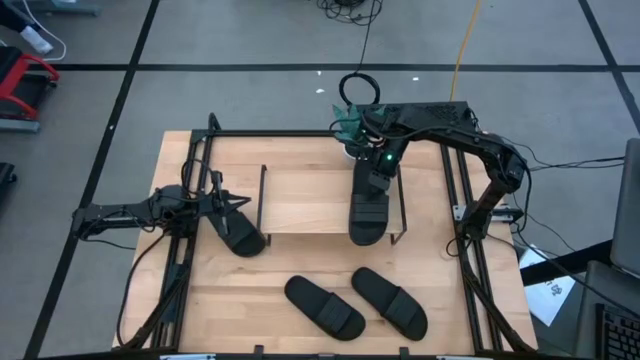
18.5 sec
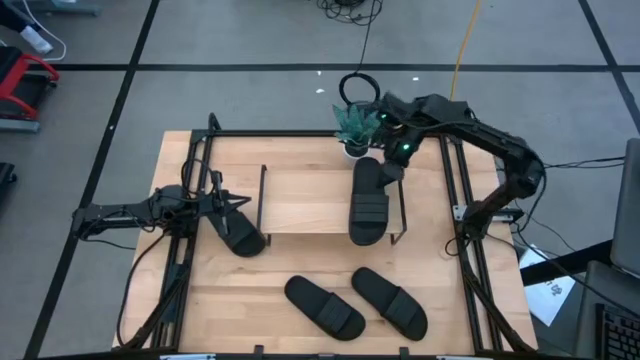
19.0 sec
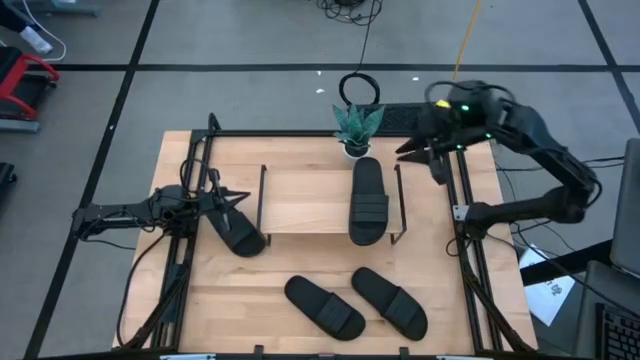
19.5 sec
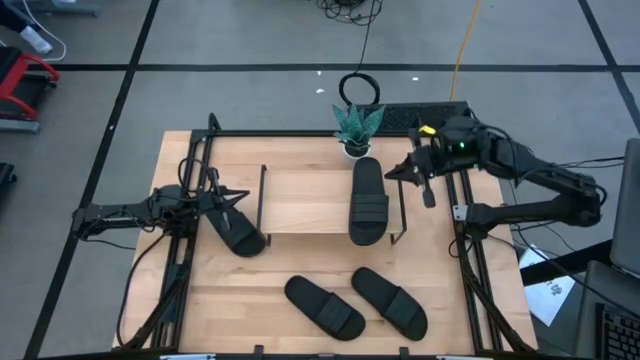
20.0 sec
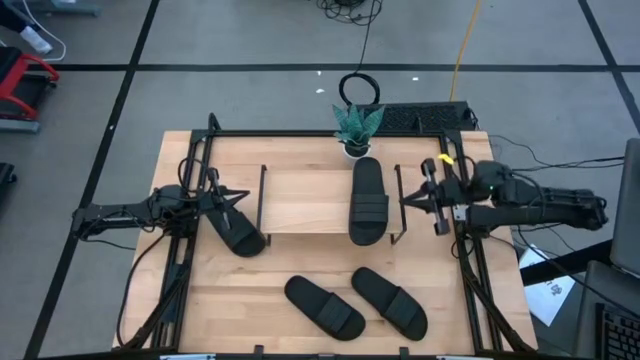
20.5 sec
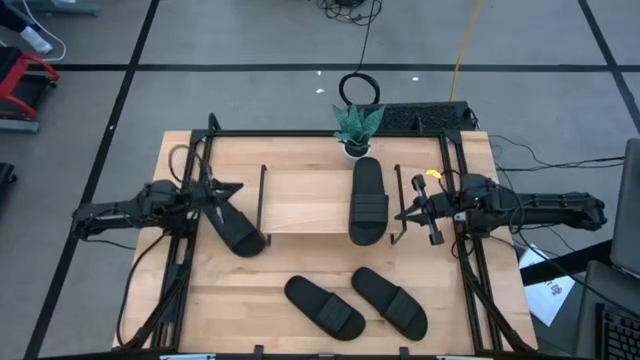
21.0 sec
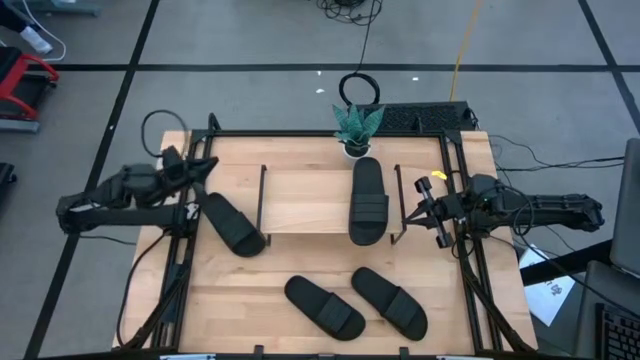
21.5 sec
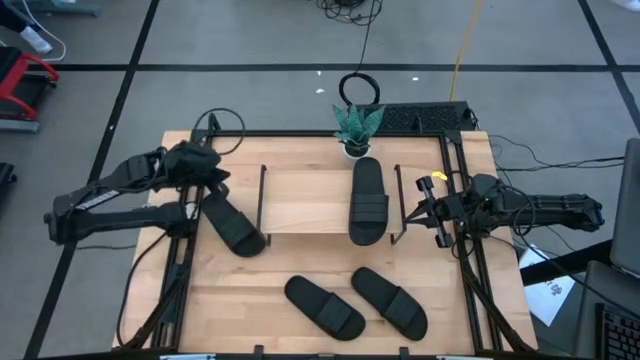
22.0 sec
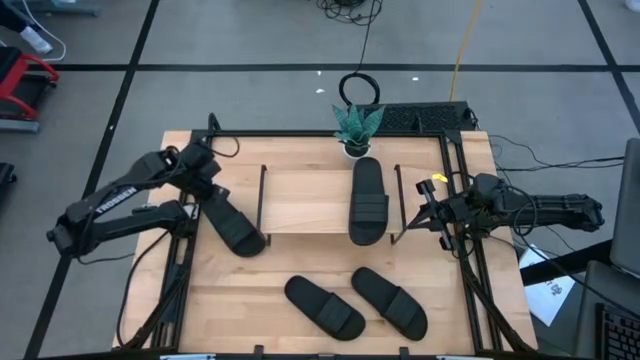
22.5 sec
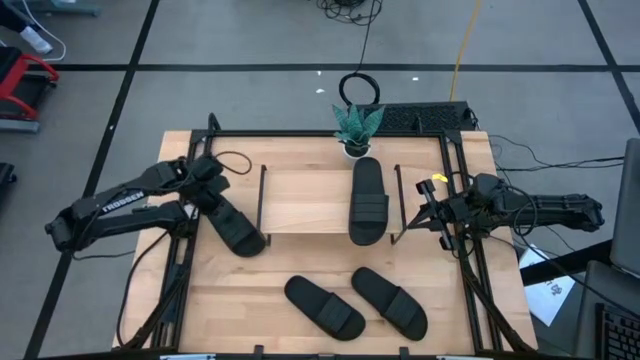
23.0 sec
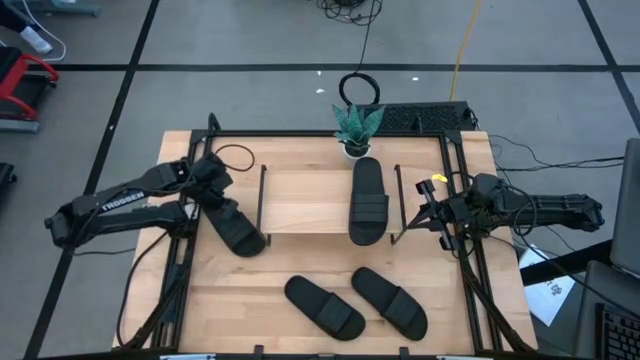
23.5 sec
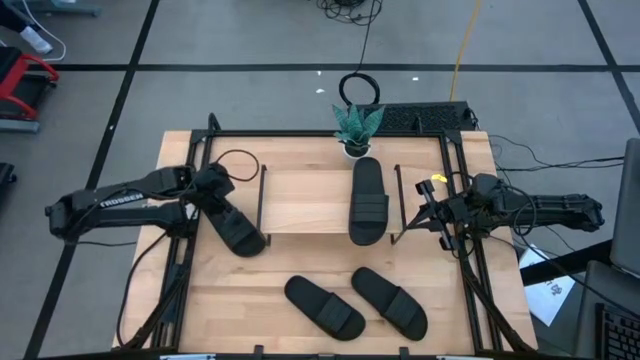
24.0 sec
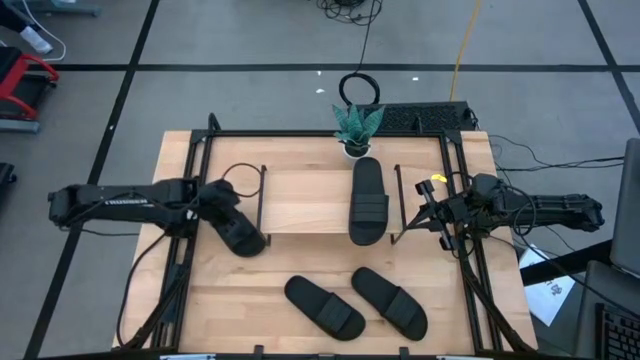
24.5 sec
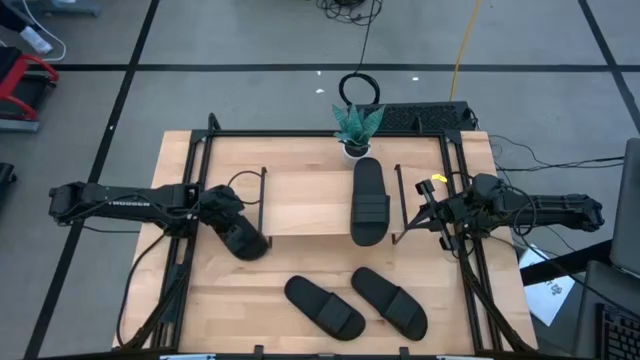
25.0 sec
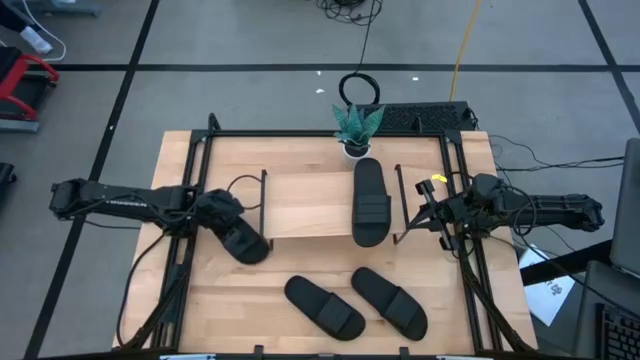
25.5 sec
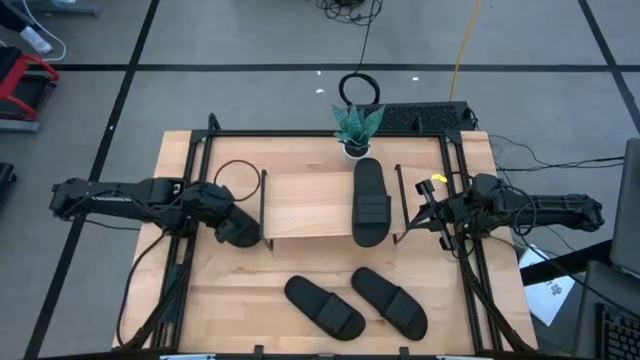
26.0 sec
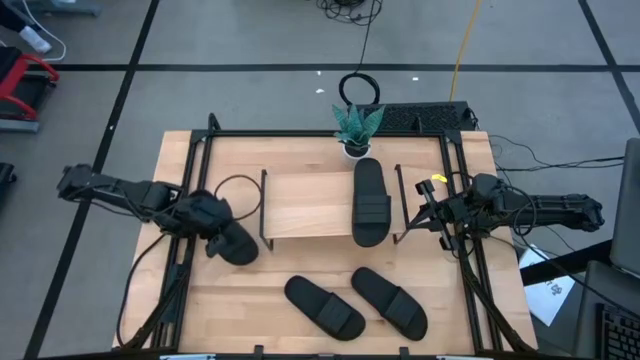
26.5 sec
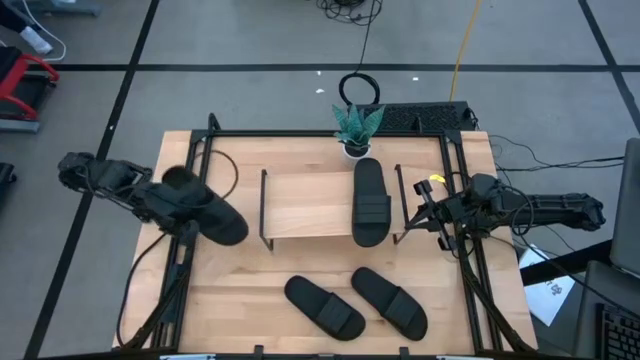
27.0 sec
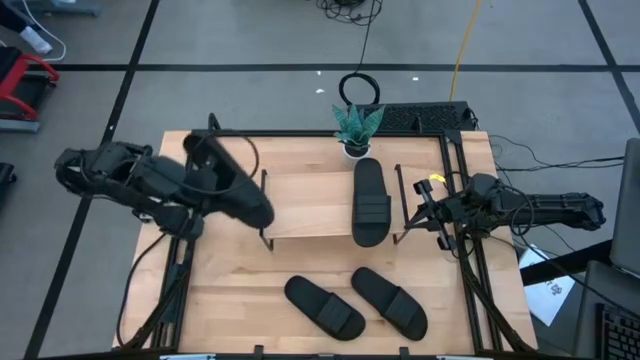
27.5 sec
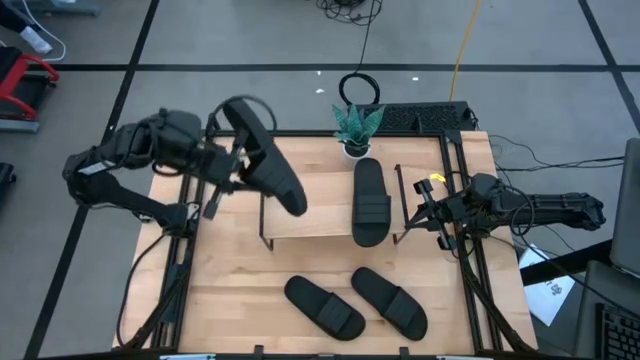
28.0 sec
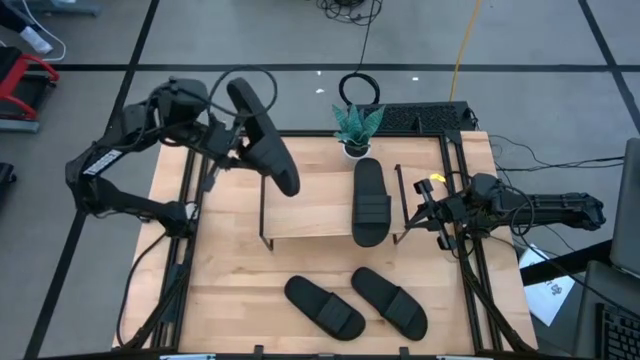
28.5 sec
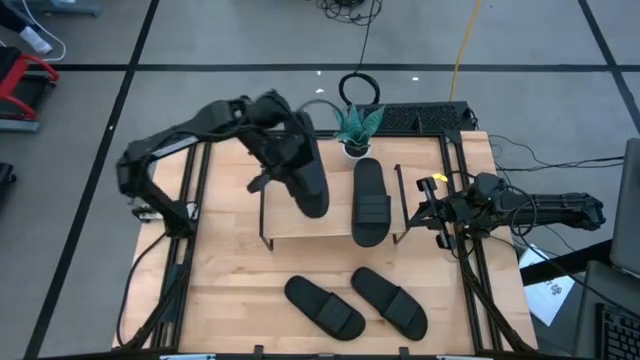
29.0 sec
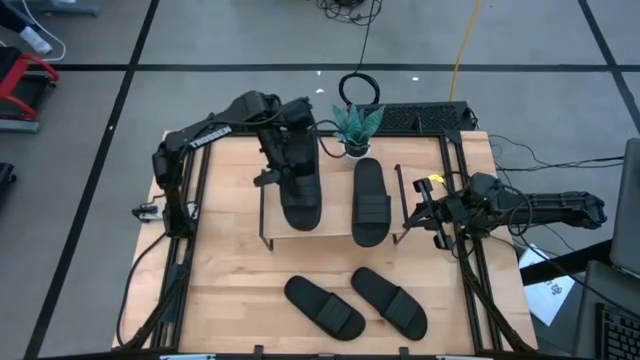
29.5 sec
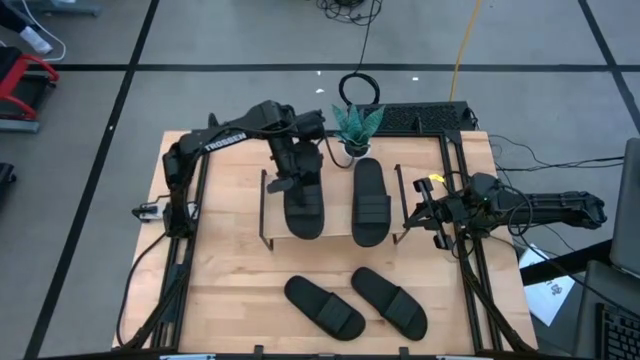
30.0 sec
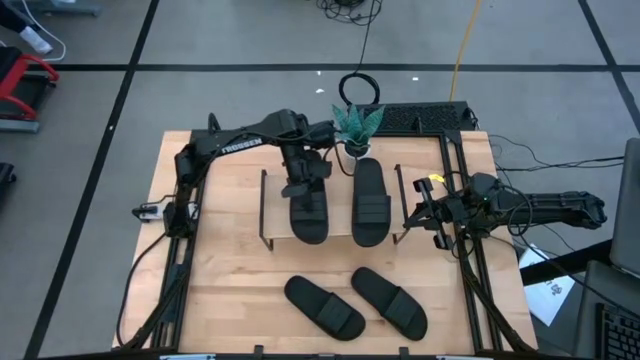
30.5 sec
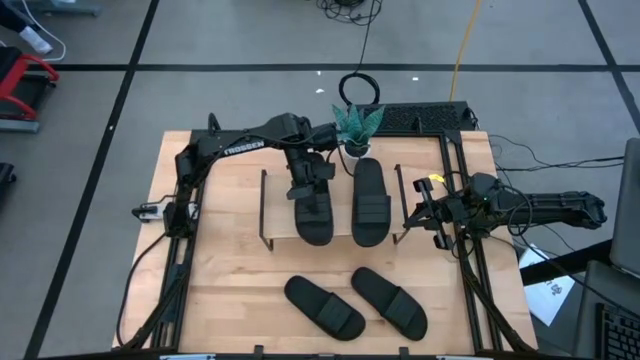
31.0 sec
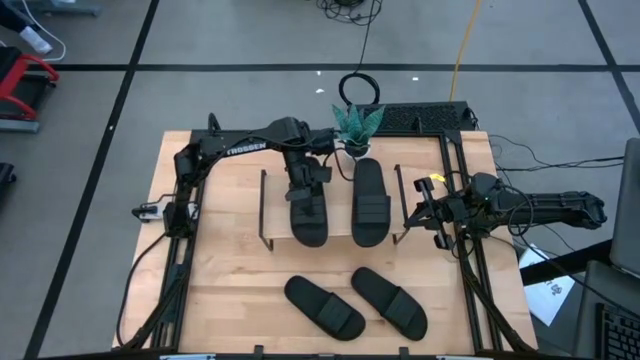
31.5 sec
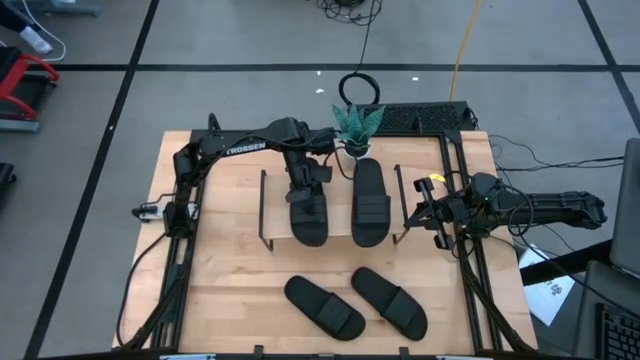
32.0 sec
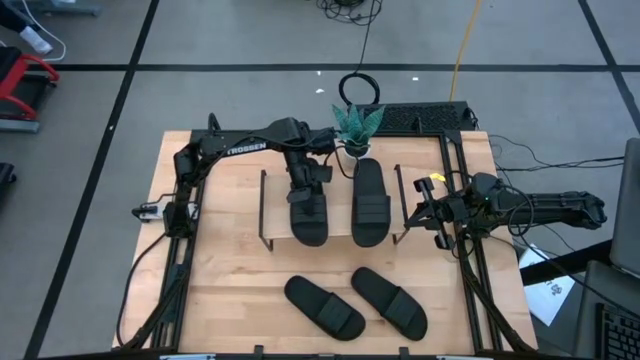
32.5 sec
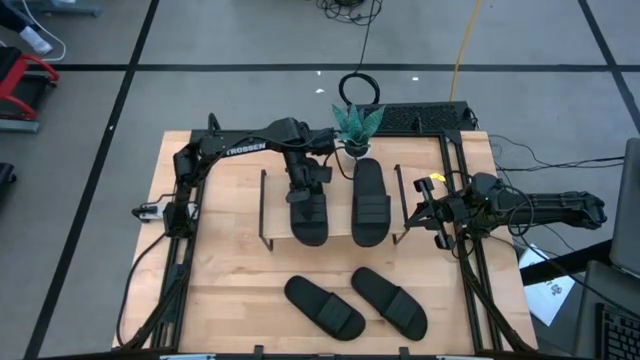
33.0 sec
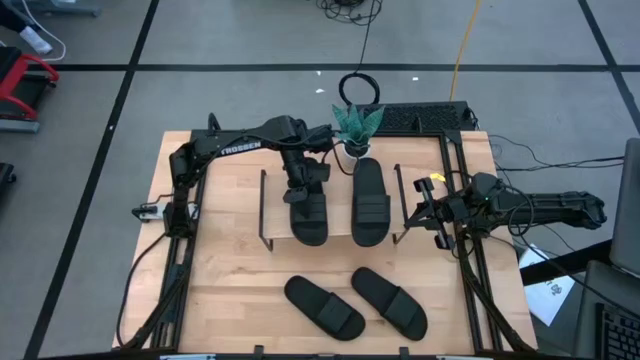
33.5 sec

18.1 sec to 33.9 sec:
Task: Pick and place slides into the shelf
Put the black slide on the shelf

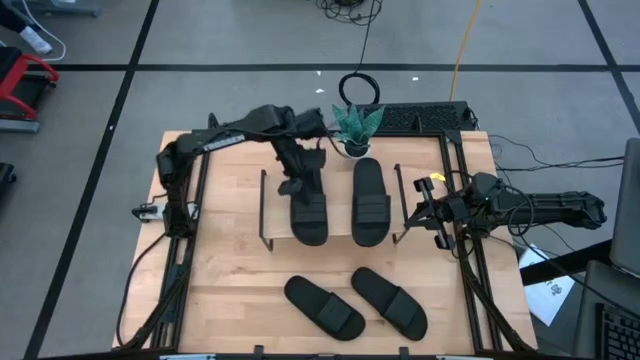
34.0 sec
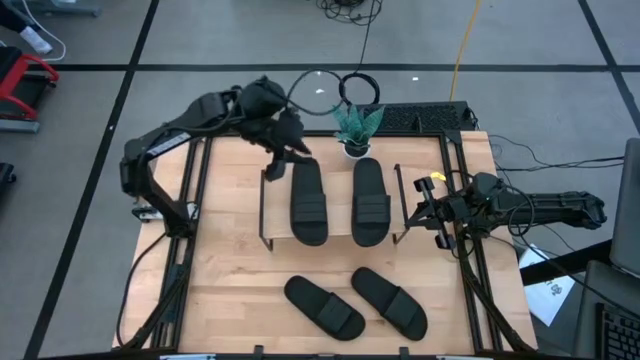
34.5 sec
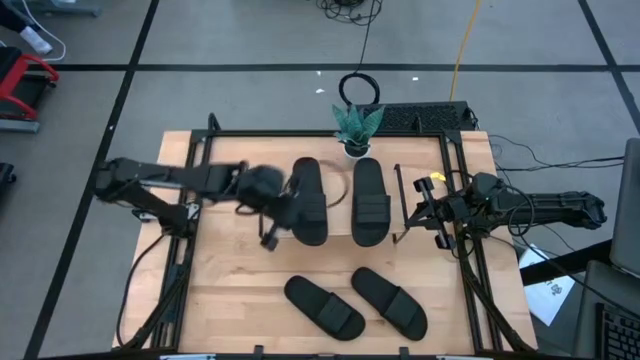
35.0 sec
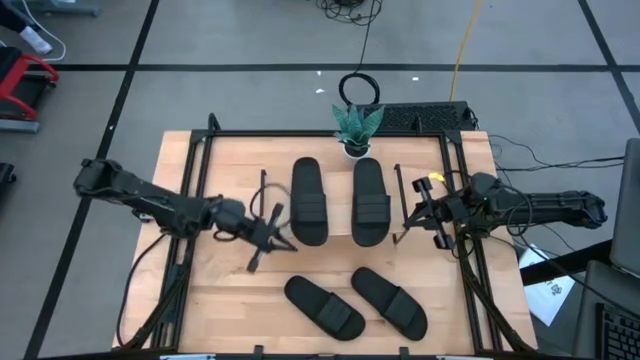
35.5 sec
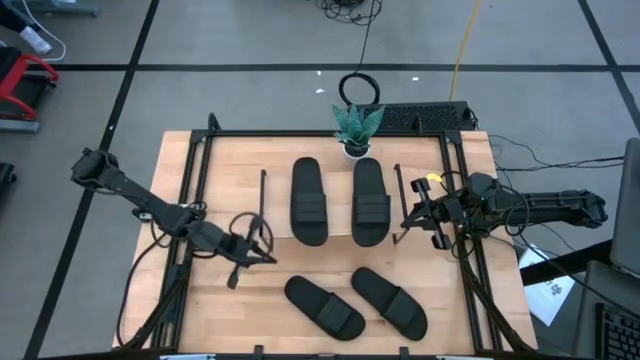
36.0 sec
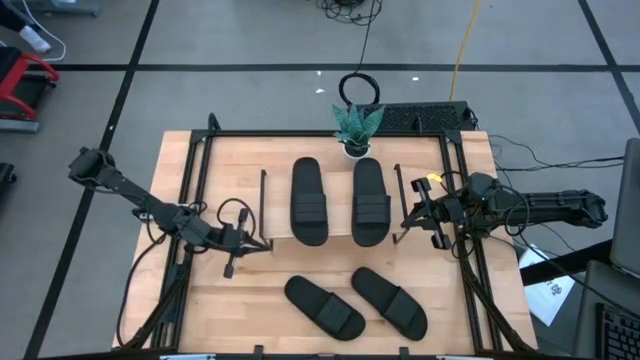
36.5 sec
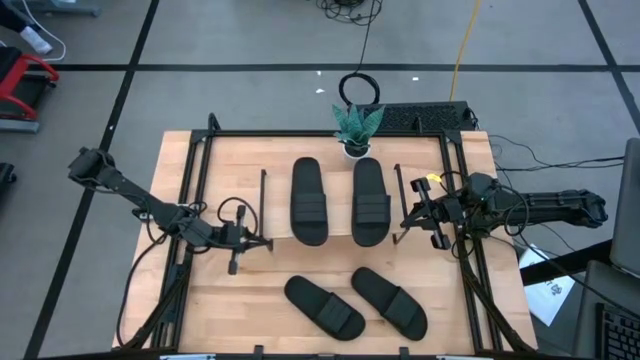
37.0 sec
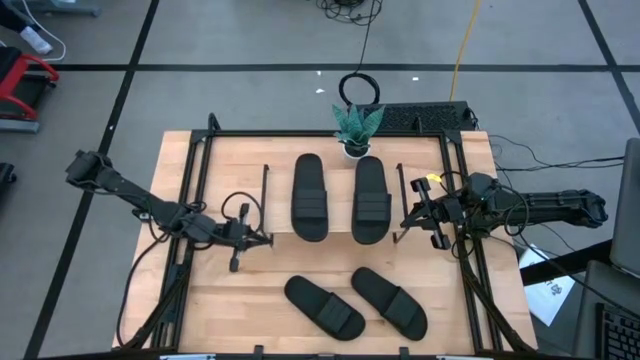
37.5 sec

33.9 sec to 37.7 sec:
Adjust the shelf on the table

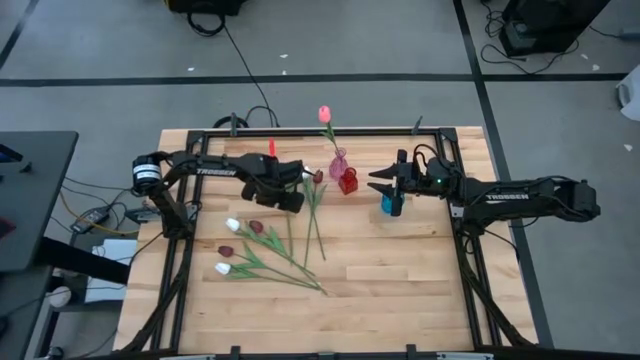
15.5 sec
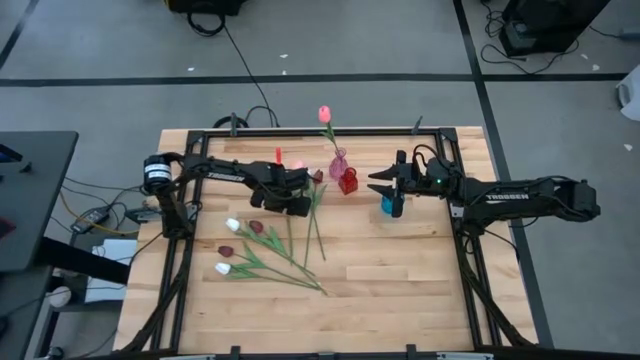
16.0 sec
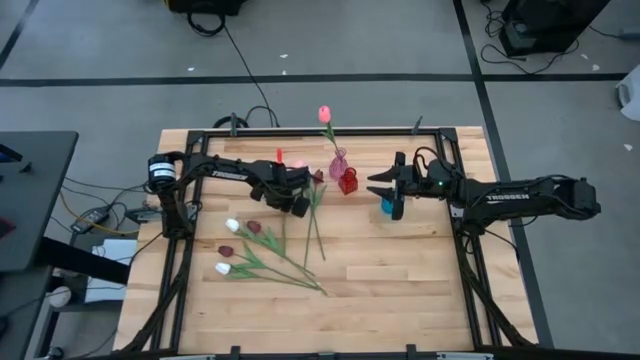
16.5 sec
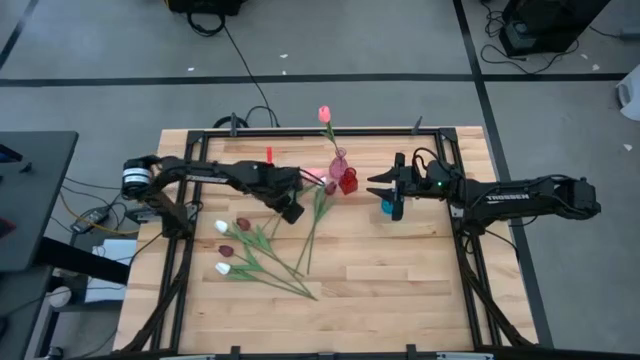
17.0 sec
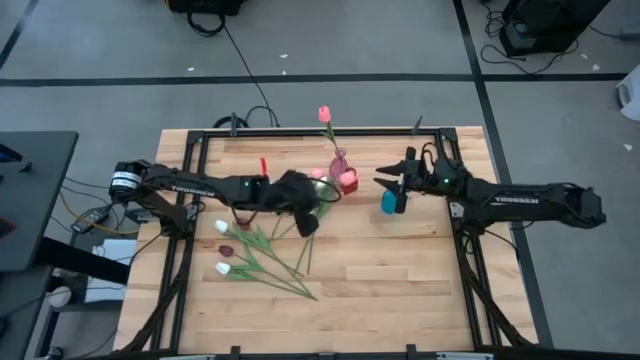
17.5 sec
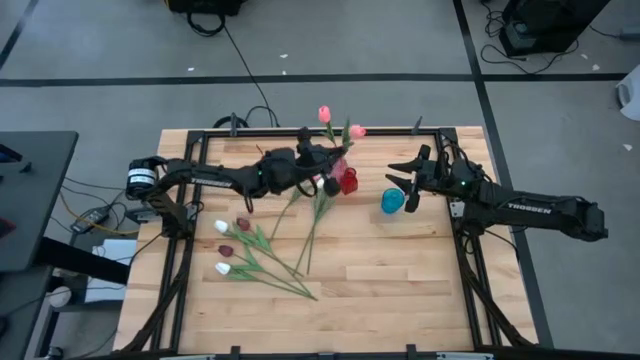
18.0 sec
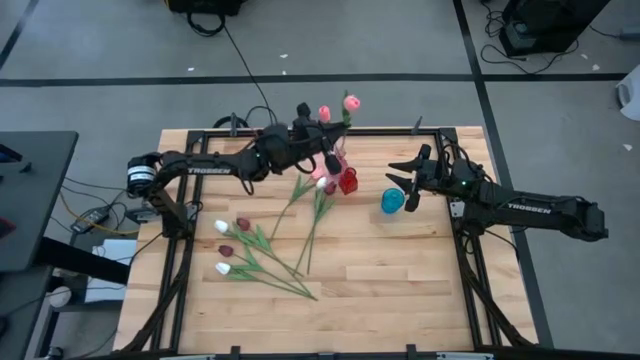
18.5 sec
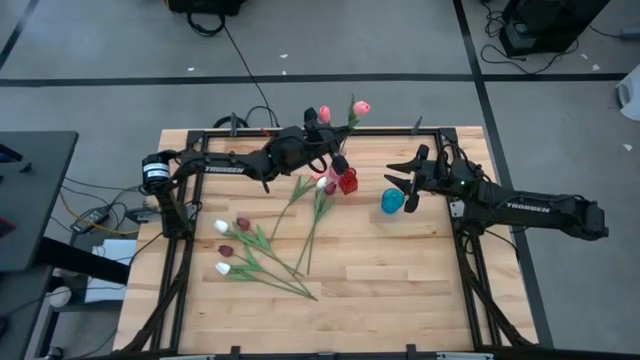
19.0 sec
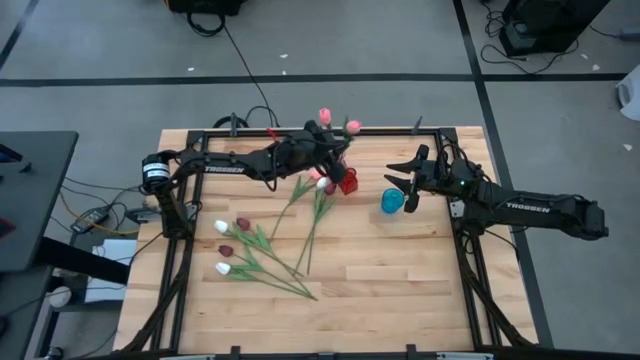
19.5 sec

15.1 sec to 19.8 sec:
Task: Sort flowers into vase by color
Put the bottom pink flower into the pink vase
